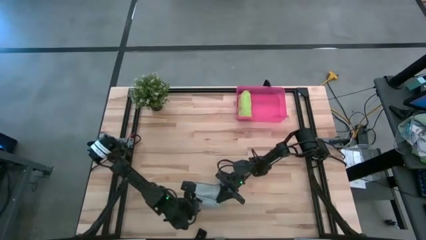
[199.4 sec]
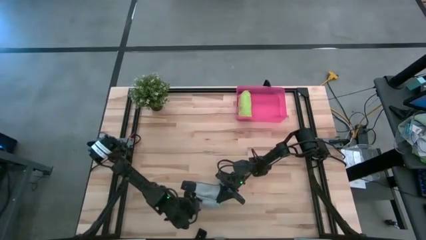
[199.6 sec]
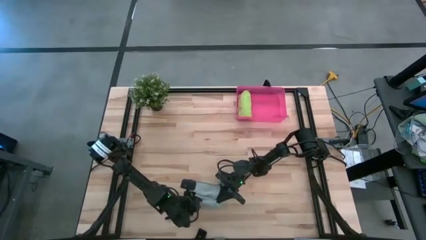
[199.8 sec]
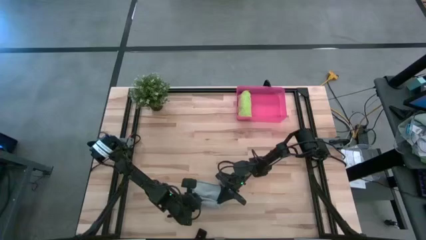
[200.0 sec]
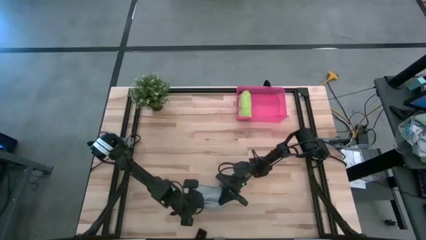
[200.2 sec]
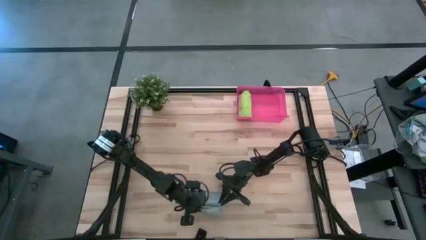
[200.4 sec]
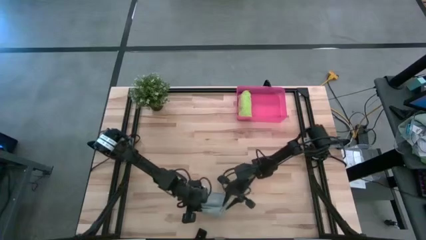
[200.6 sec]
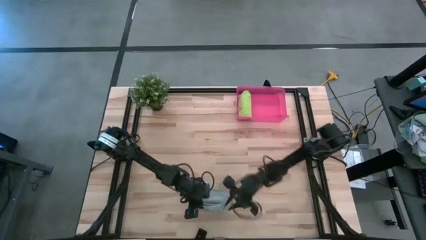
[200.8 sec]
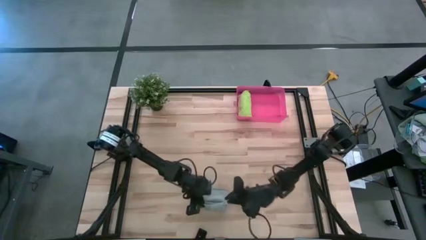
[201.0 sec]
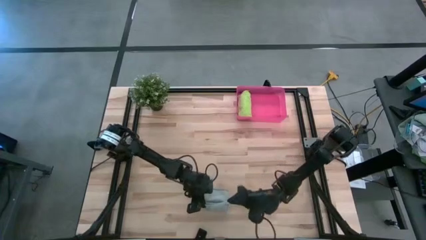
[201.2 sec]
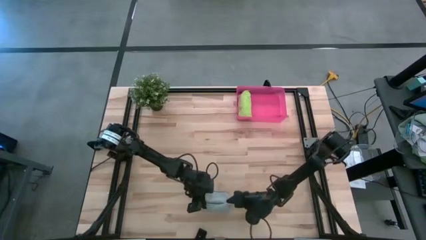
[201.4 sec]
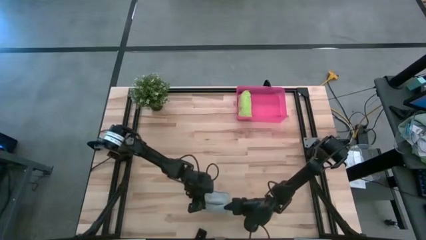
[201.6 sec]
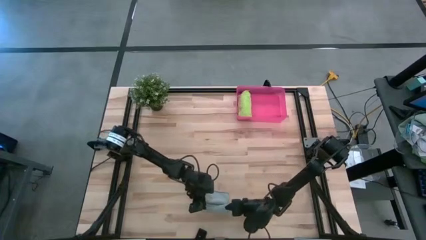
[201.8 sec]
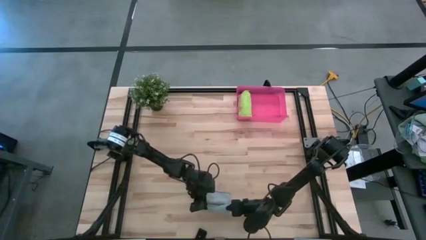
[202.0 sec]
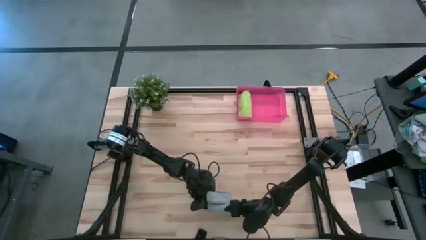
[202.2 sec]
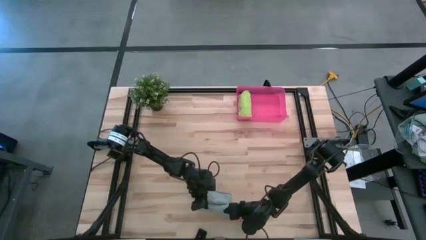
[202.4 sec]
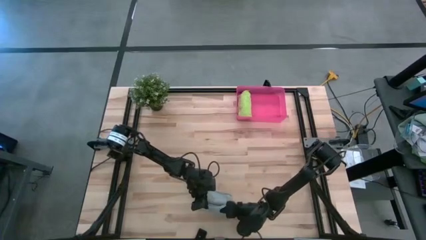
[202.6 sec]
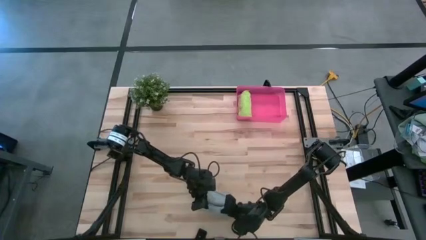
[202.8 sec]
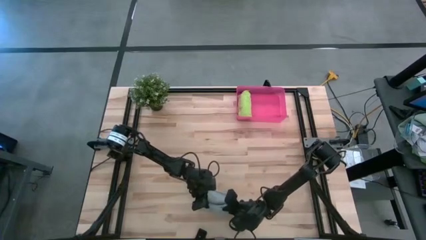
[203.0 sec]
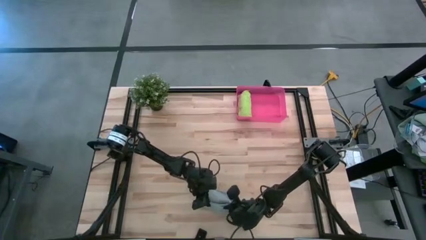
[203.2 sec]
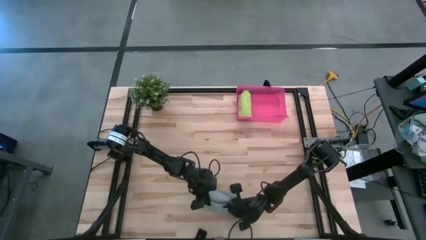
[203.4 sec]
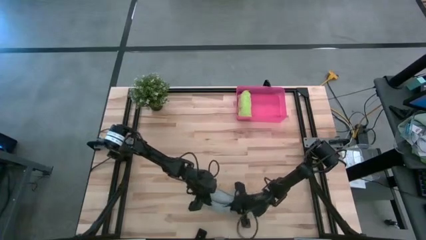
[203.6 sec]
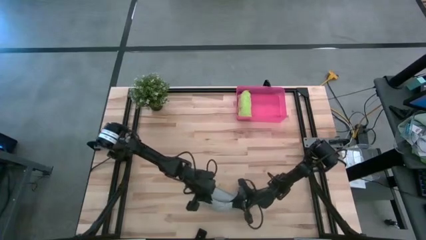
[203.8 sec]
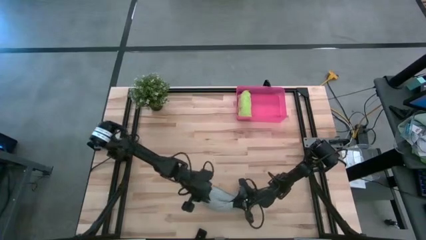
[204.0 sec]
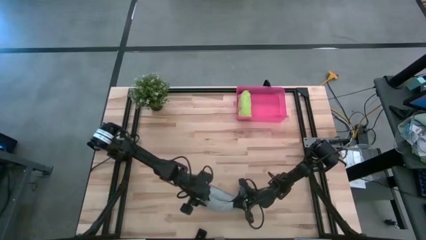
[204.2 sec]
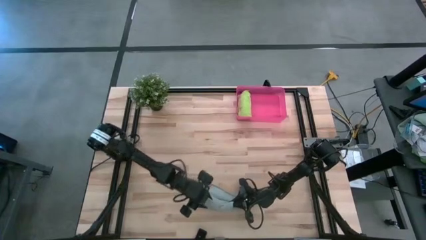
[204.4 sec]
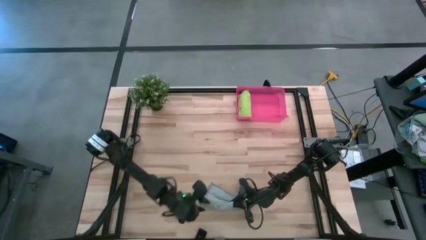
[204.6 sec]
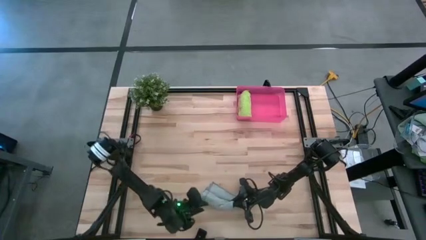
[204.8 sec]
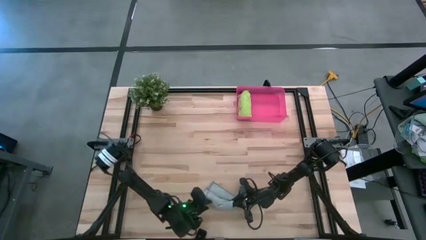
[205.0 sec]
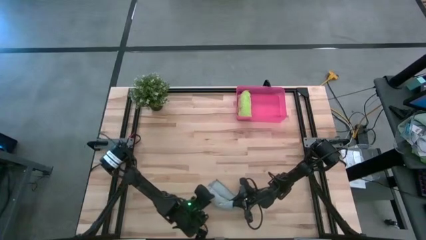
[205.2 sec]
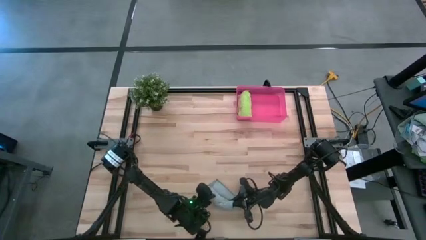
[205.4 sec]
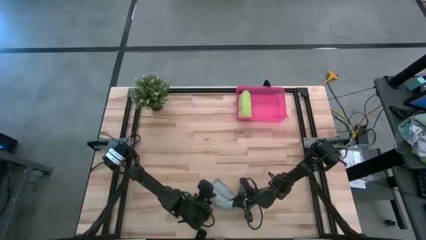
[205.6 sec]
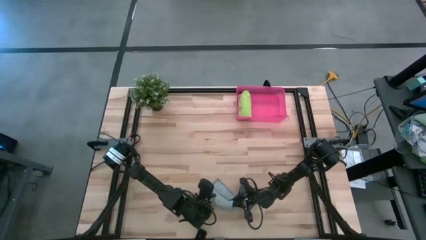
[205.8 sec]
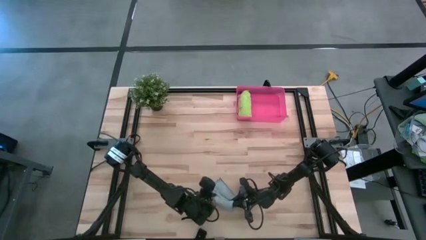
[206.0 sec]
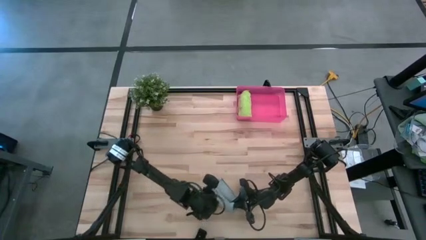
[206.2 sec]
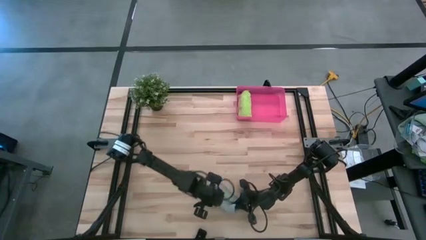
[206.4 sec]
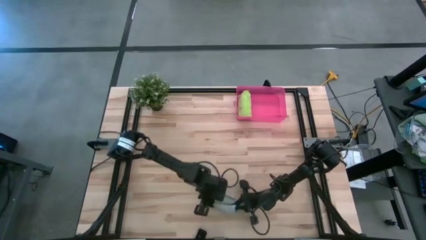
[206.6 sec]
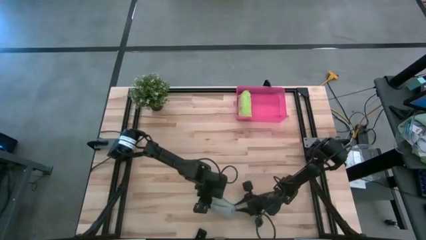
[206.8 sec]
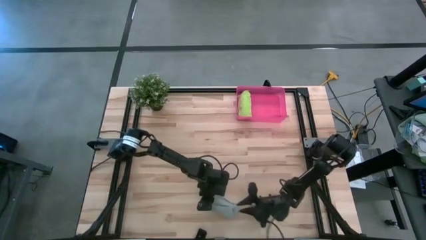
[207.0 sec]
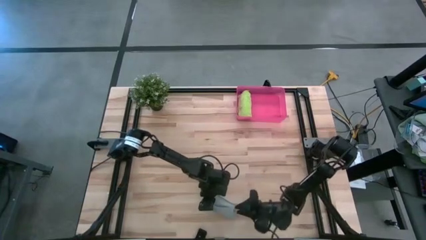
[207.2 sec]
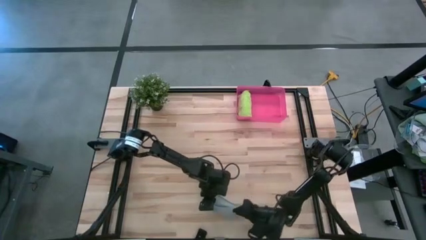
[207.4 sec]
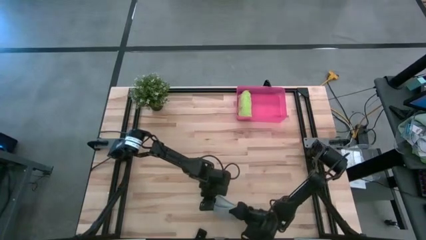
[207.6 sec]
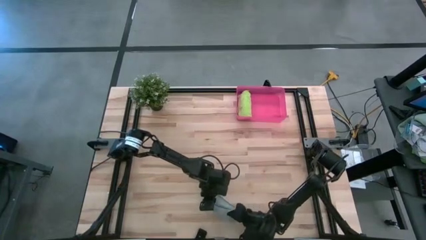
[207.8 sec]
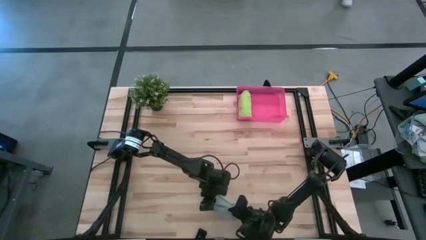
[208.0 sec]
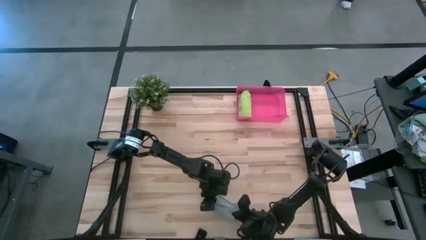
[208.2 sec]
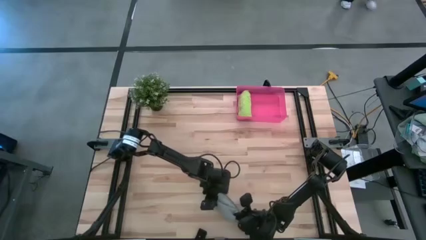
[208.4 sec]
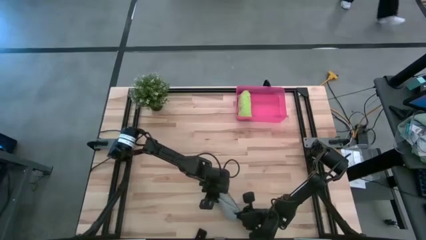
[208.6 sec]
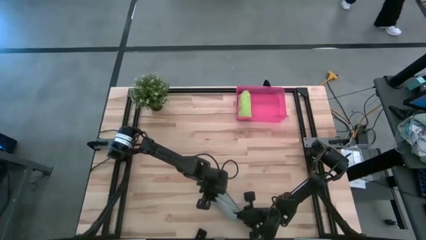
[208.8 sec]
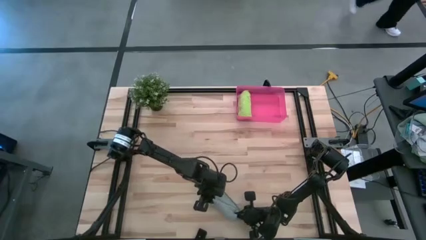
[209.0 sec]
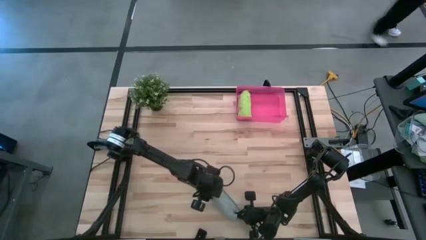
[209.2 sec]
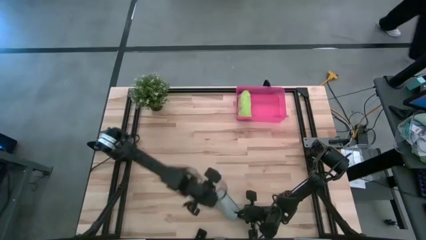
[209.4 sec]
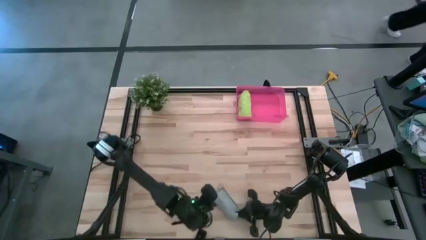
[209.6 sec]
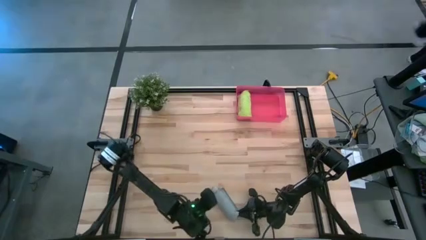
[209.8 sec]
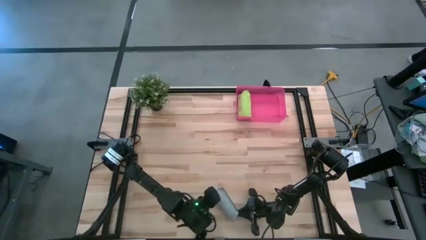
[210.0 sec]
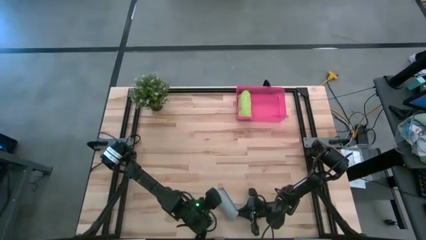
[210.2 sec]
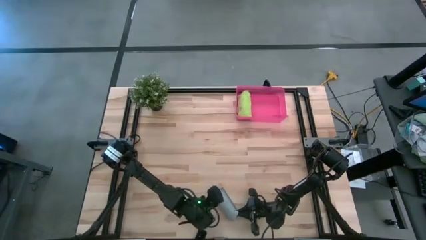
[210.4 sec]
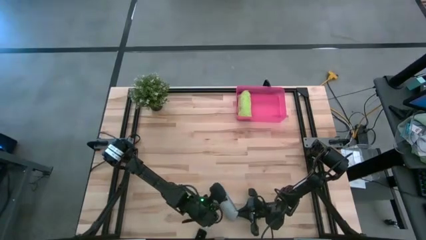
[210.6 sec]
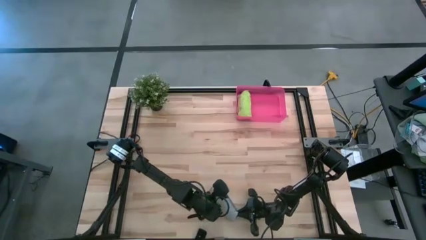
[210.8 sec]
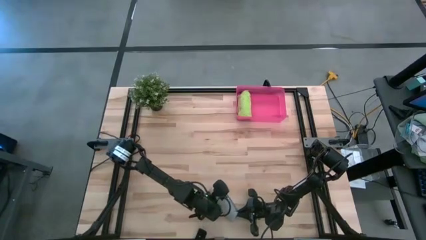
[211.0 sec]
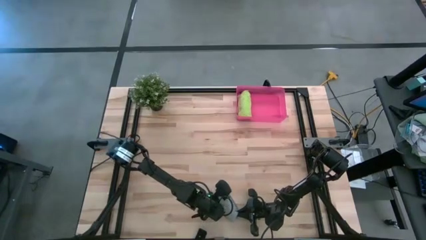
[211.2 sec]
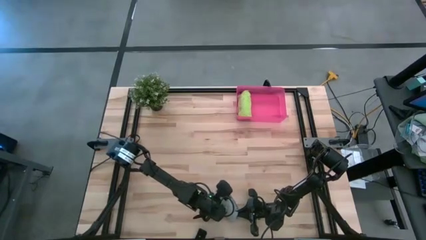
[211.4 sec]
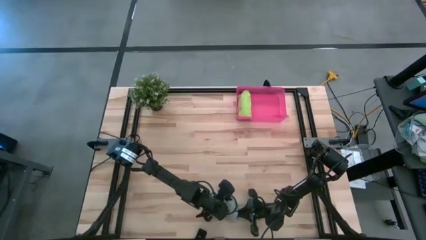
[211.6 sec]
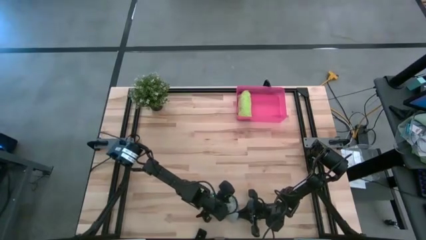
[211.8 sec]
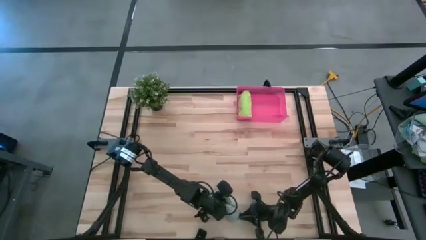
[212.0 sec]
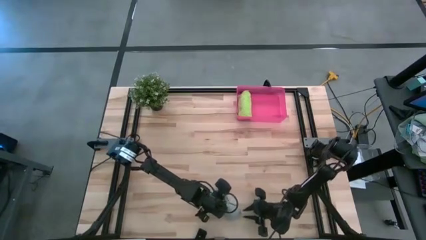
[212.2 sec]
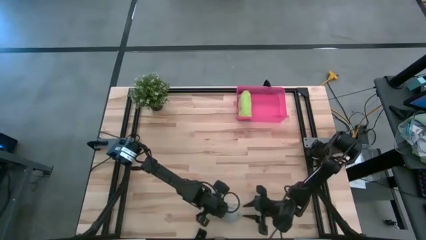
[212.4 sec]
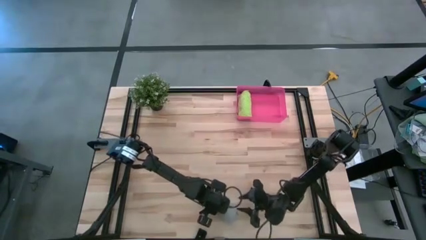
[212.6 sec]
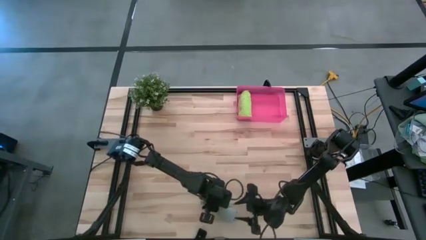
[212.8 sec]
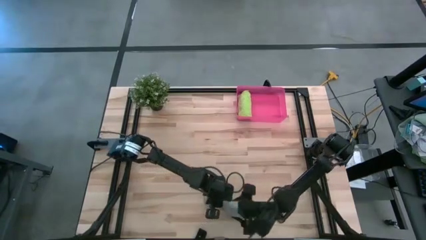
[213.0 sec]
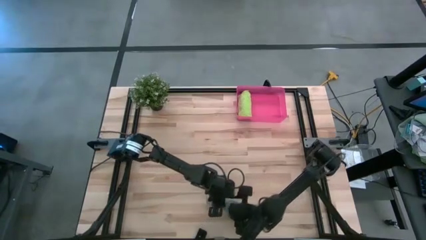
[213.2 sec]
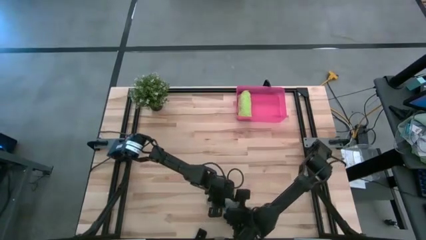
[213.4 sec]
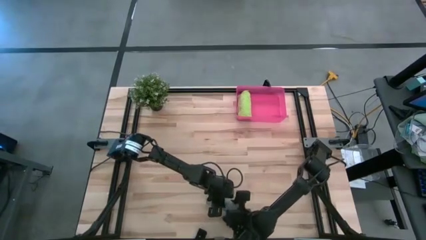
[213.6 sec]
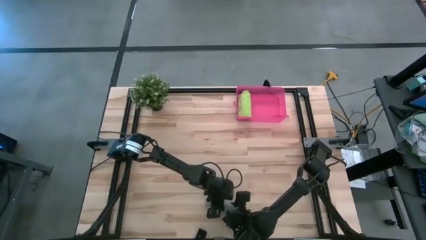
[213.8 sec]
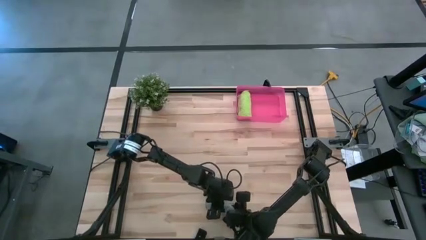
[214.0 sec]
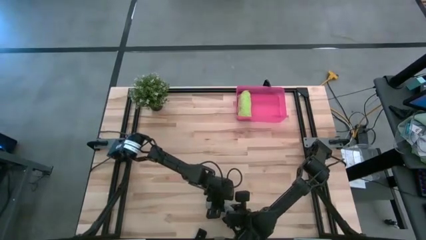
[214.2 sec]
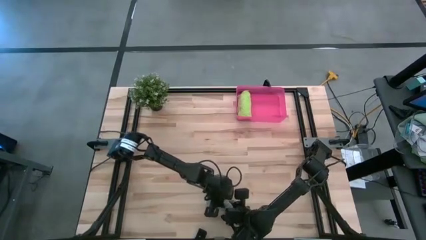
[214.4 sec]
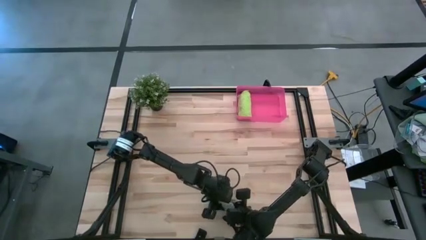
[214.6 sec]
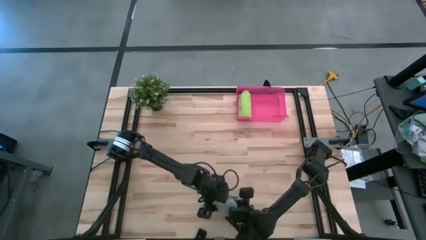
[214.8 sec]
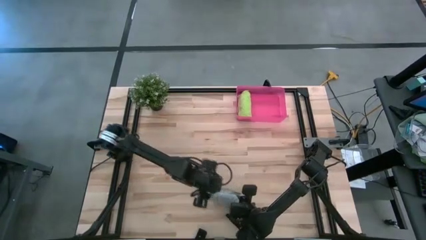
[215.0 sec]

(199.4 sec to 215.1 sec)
Task: Roll microfiber towels into tight, uniform cylinder then place into a basket
Roll the gray microfiber cloth
